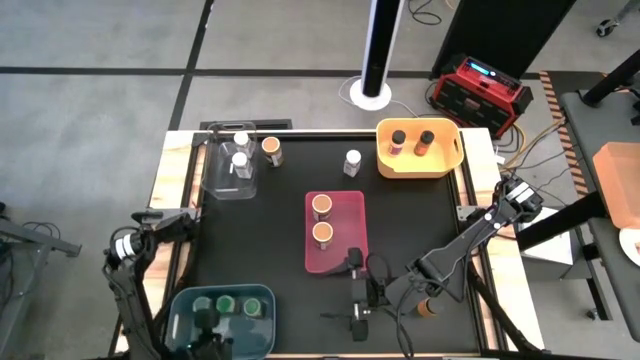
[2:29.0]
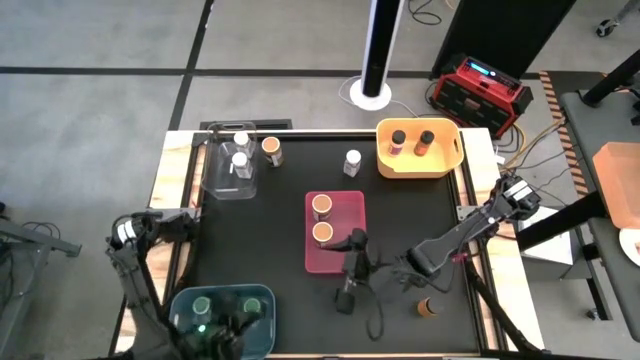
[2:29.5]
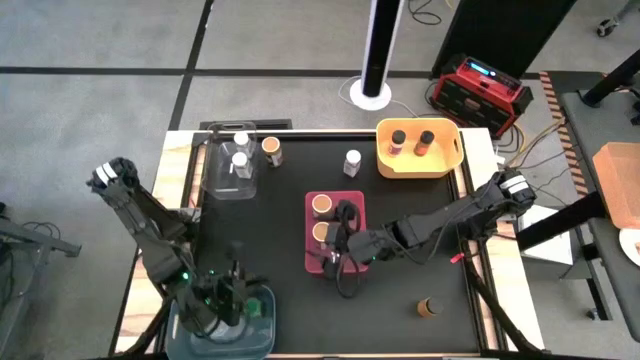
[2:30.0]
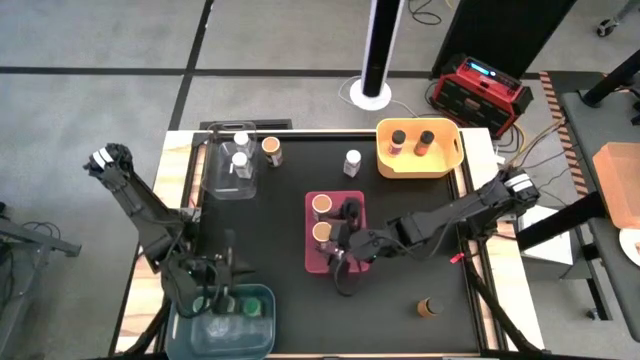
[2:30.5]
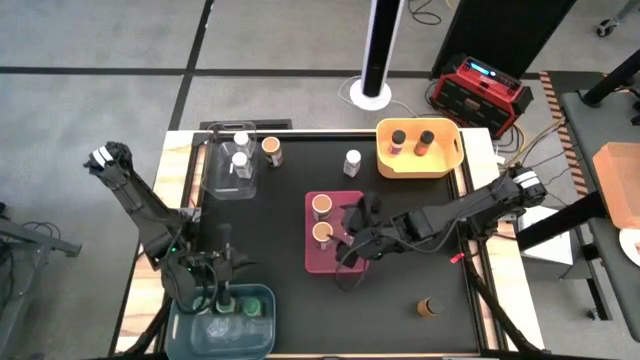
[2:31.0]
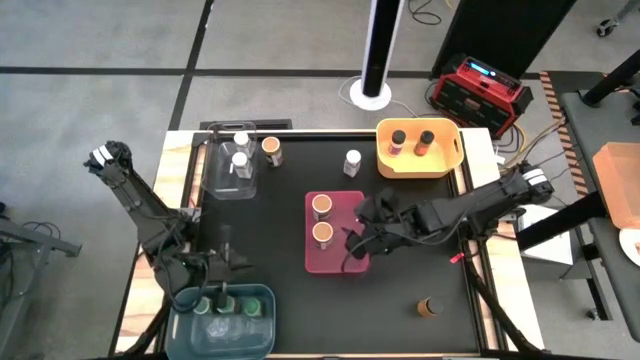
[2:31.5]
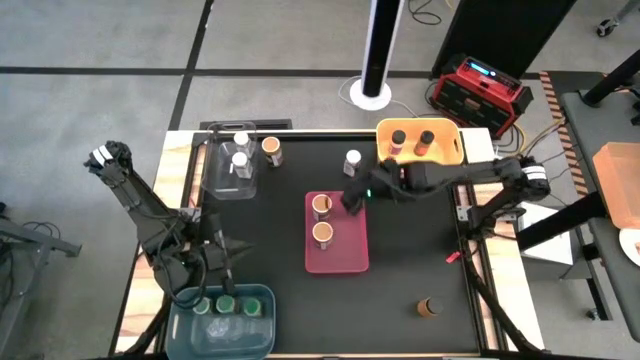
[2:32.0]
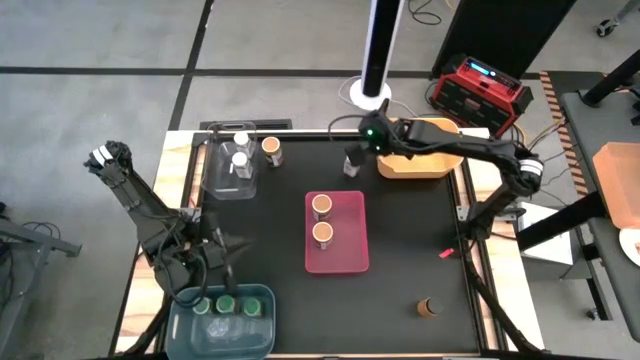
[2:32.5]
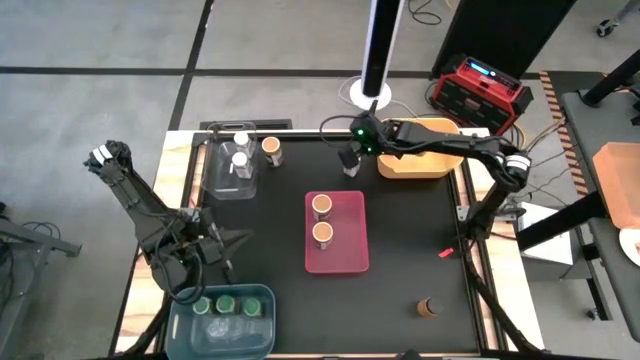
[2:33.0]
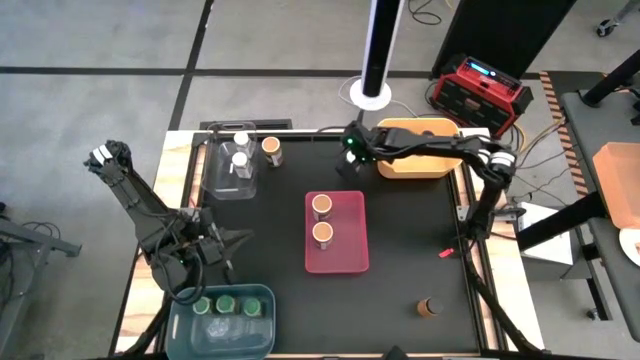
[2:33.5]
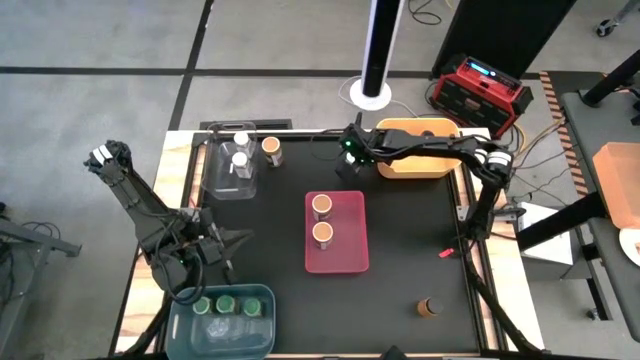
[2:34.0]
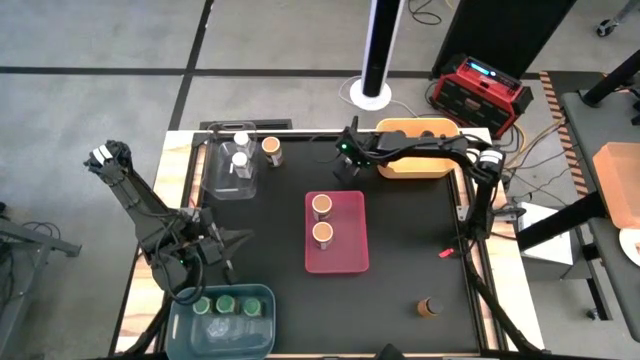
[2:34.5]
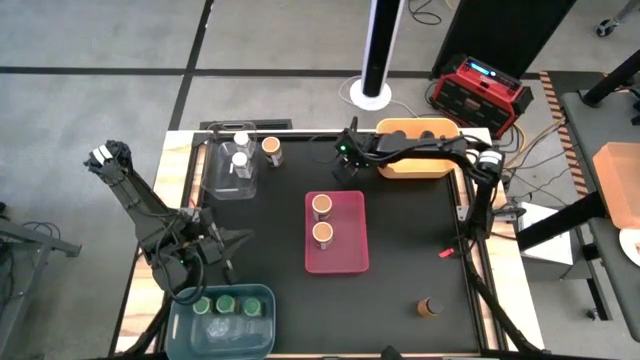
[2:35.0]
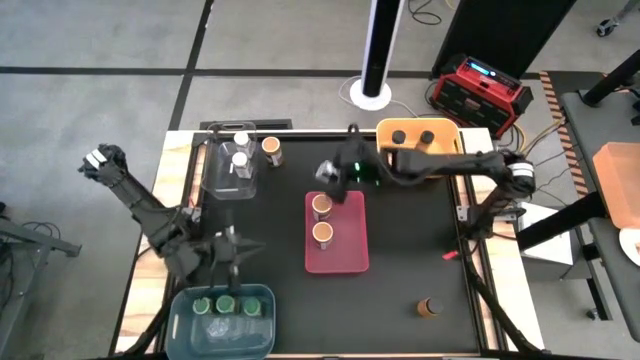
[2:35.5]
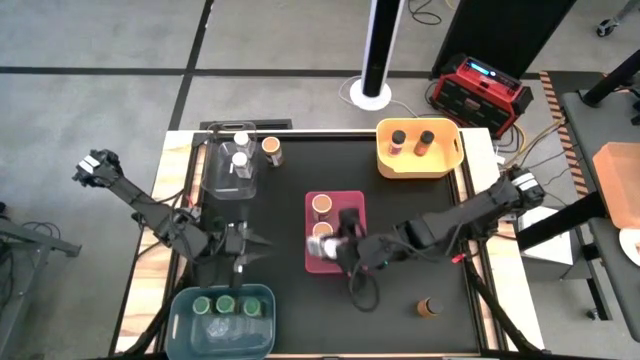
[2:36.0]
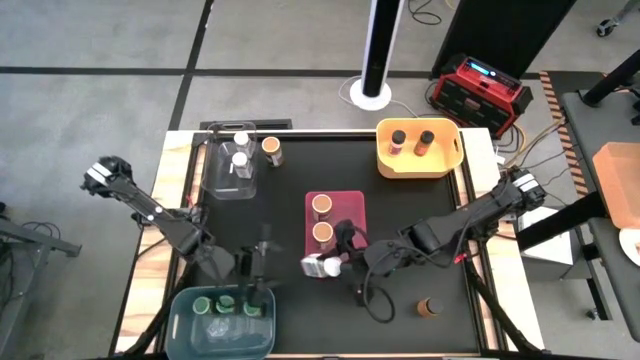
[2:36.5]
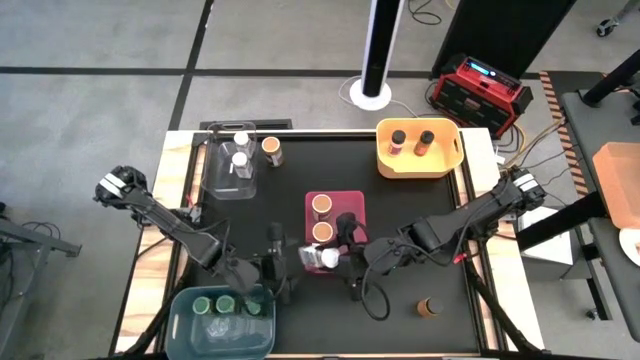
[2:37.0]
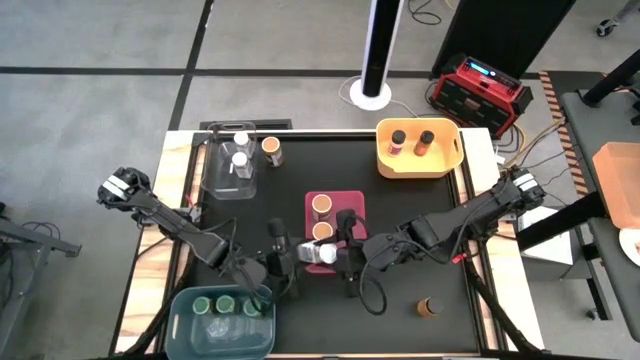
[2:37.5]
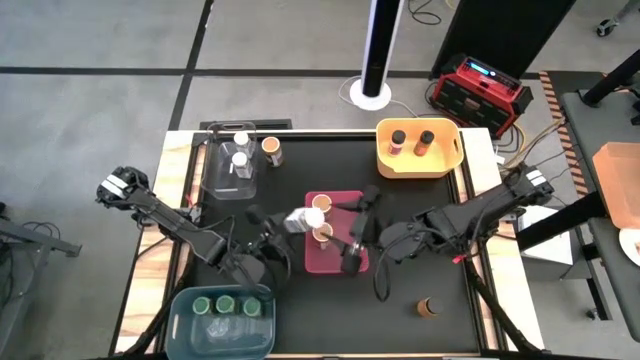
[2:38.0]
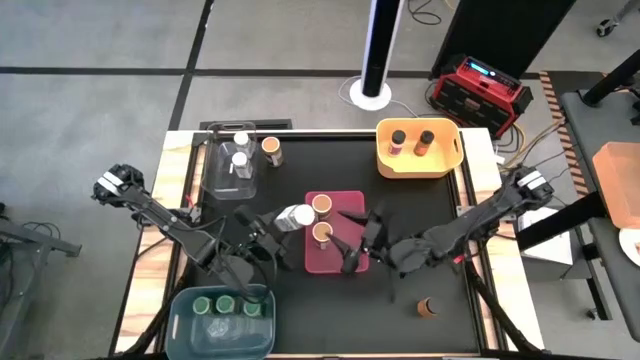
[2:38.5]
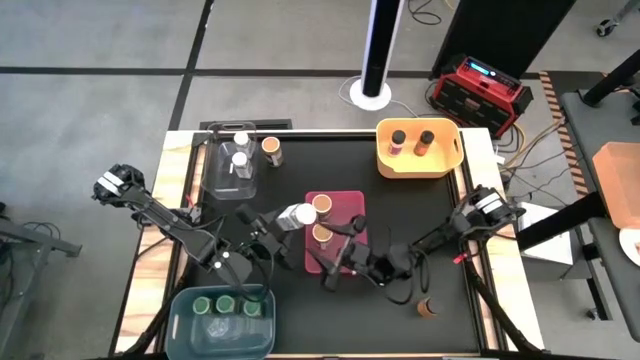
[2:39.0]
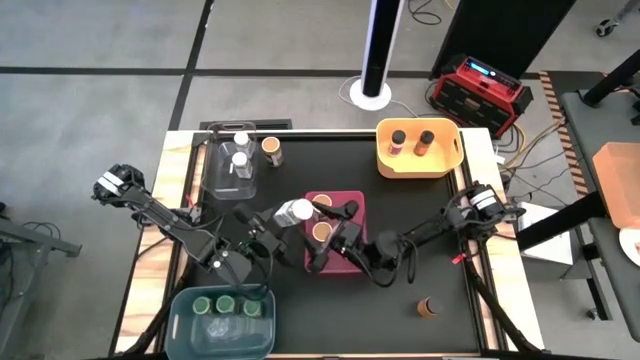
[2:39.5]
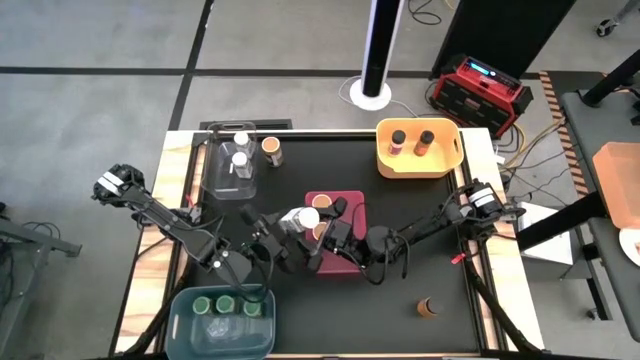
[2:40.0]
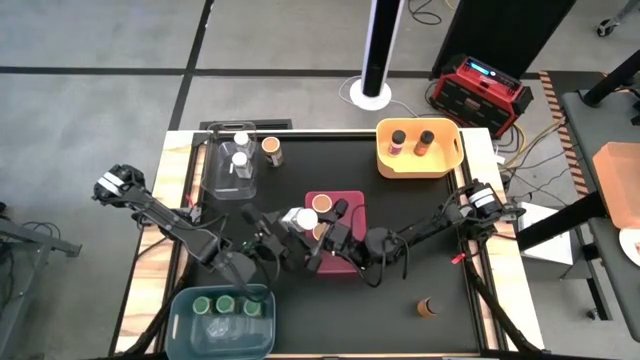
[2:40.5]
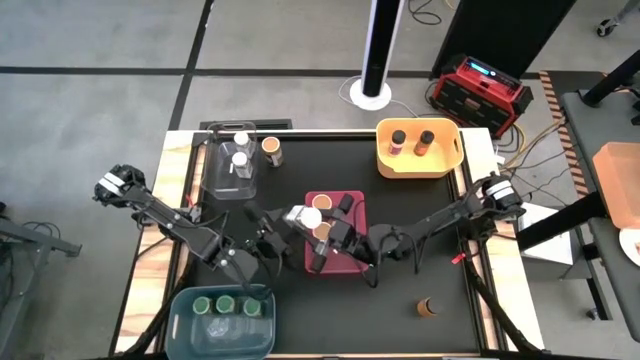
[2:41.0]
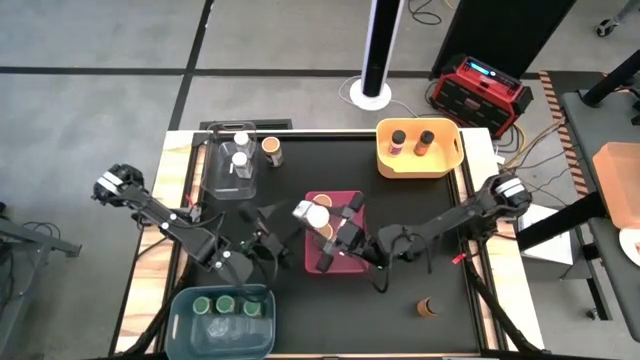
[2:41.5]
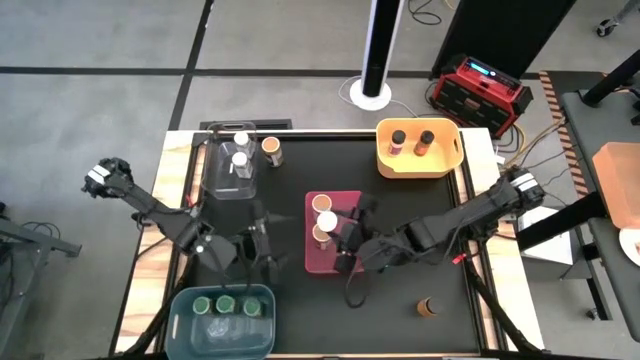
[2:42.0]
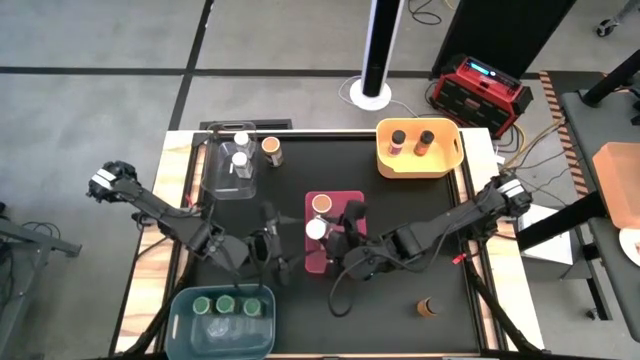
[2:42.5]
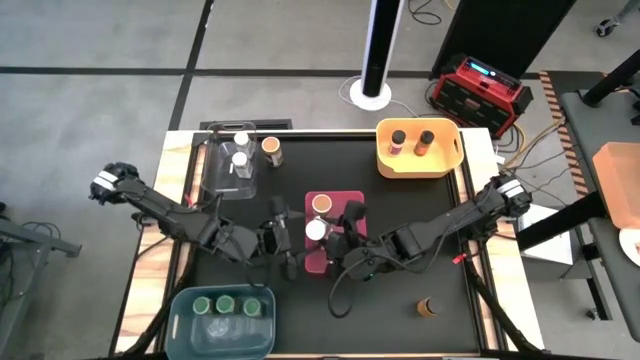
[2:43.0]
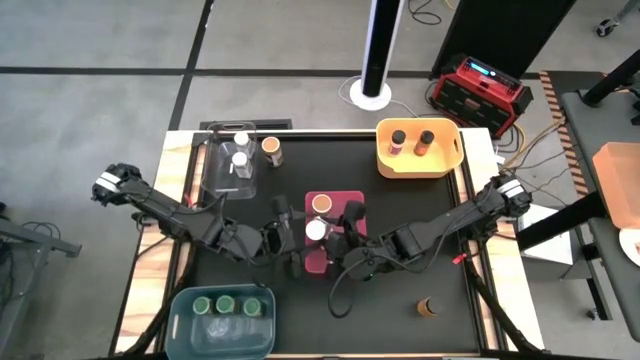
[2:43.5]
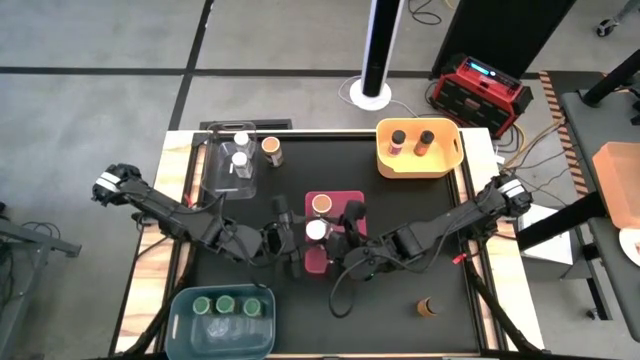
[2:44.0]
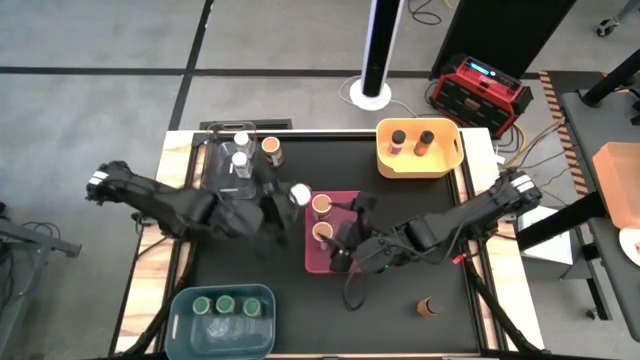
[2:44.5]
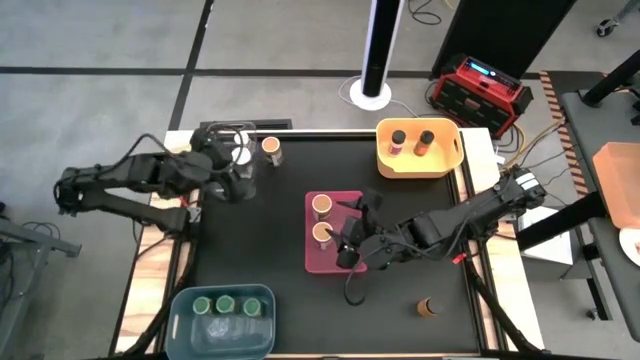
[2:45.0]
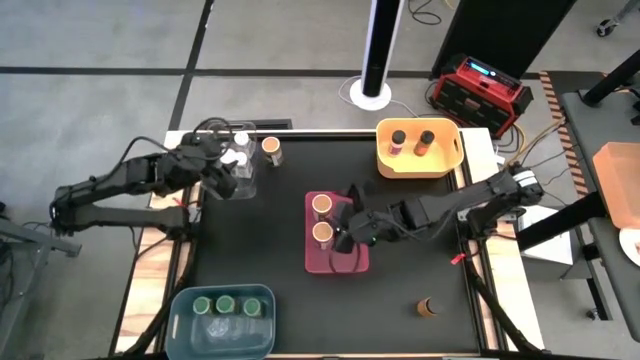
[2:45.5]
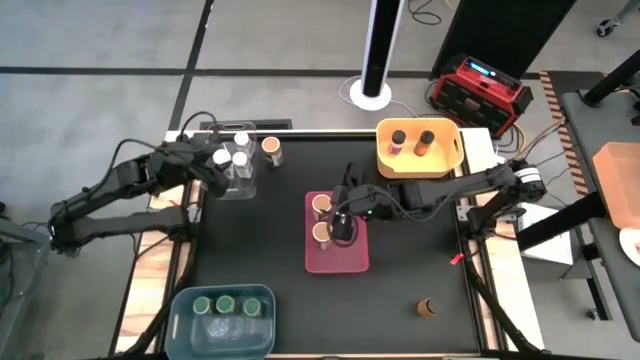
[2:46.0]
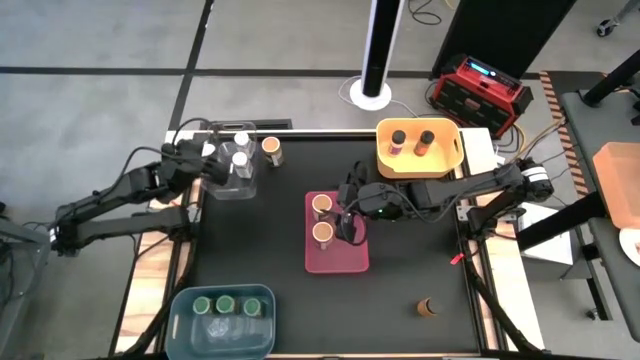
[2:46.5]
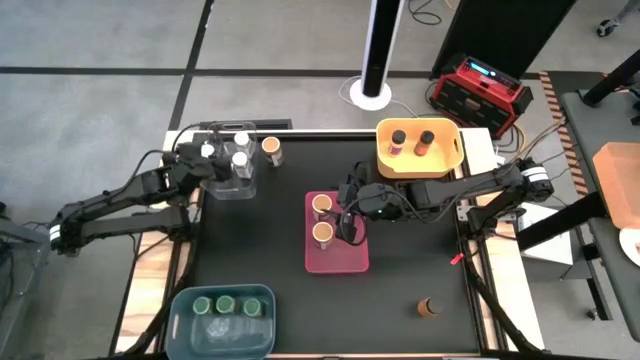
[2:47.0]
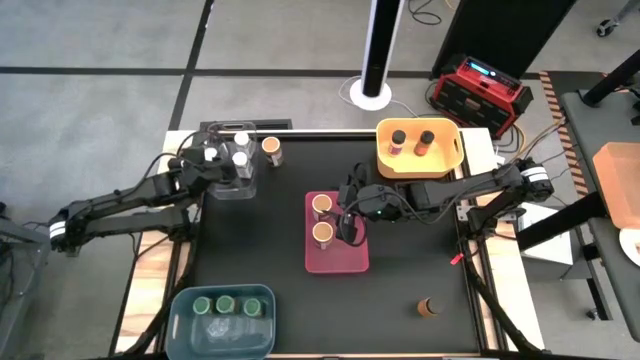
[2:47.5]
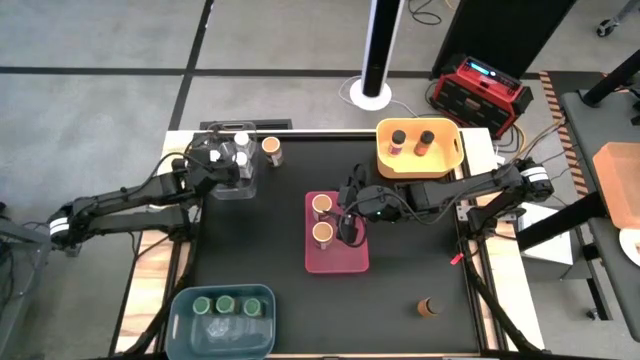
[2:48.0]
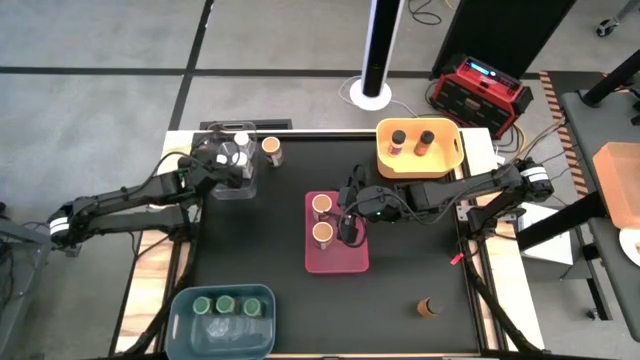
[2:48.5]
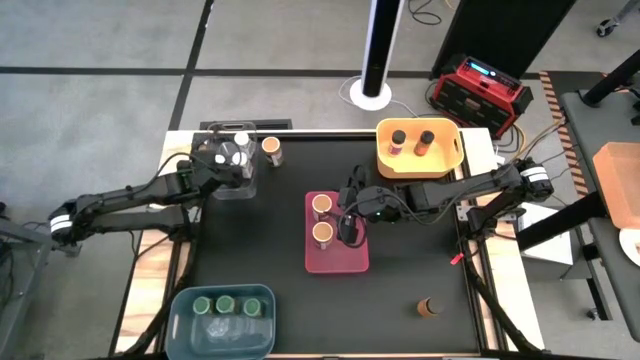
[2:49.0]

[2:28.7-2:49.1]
Task: Sort spices by type
Put the white seasoning bottle into the transparent bin
